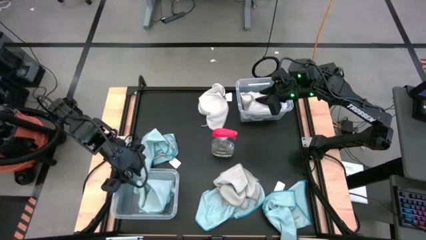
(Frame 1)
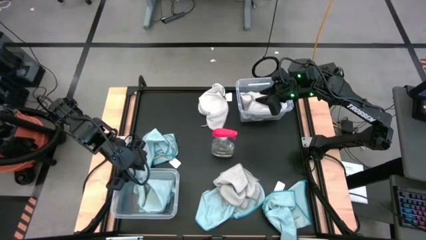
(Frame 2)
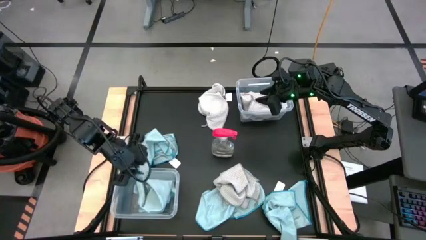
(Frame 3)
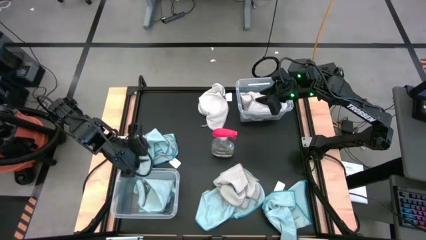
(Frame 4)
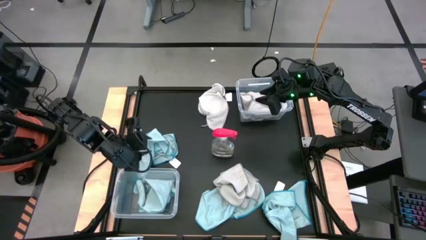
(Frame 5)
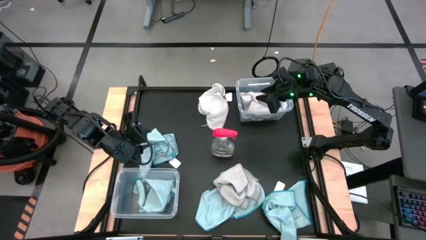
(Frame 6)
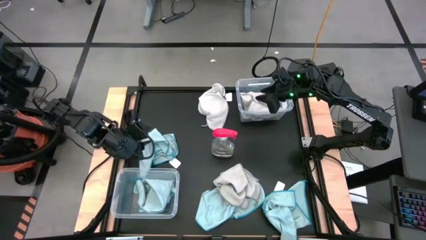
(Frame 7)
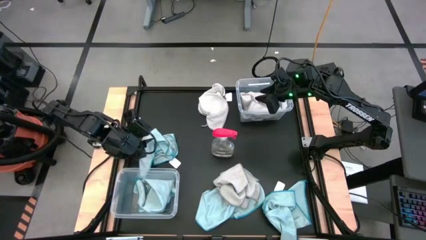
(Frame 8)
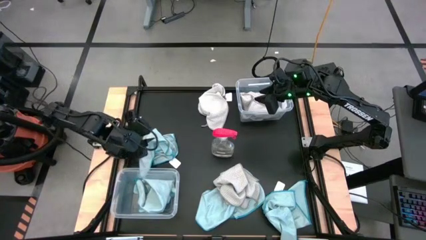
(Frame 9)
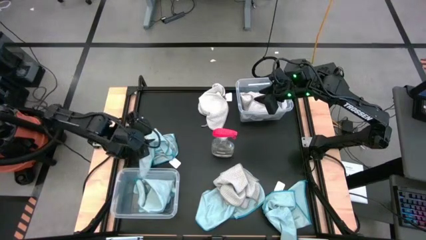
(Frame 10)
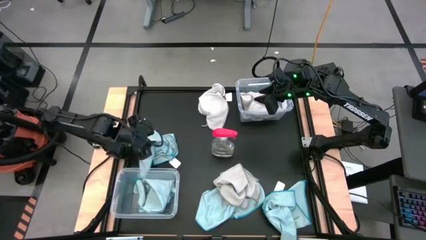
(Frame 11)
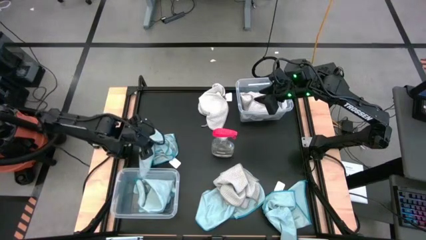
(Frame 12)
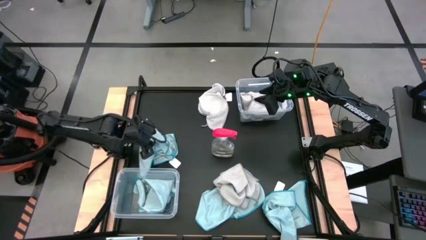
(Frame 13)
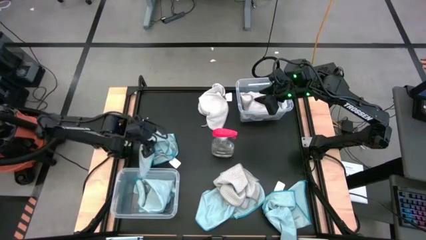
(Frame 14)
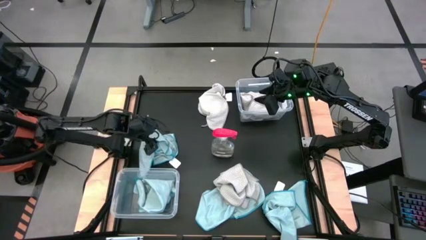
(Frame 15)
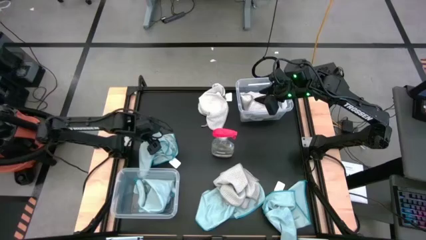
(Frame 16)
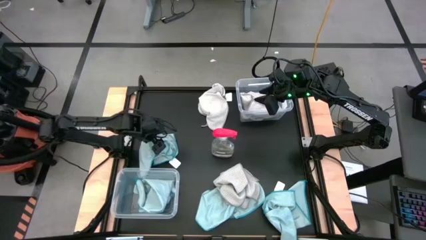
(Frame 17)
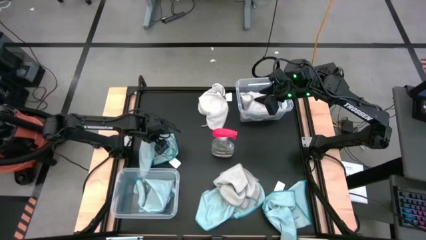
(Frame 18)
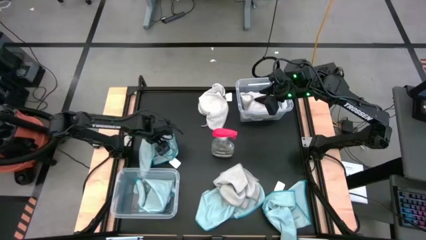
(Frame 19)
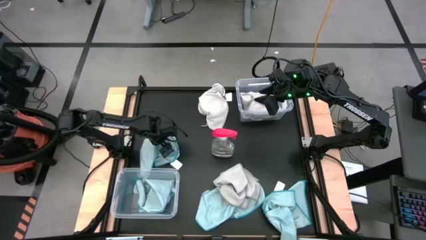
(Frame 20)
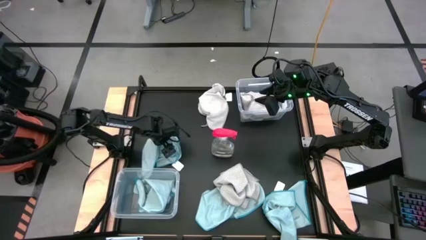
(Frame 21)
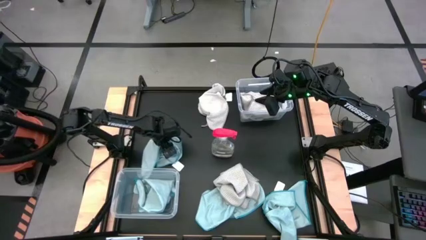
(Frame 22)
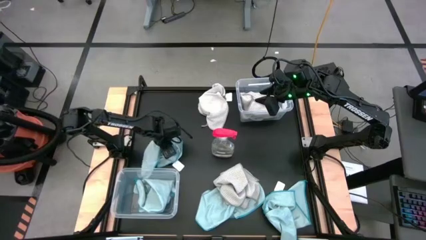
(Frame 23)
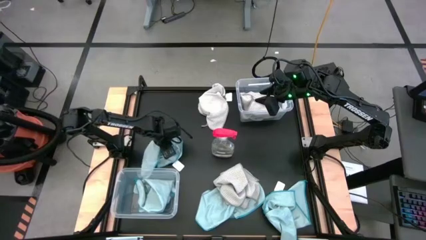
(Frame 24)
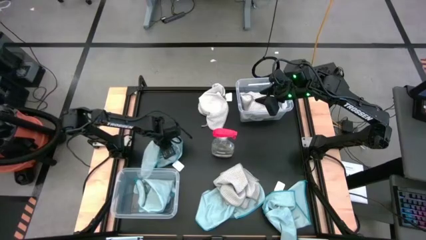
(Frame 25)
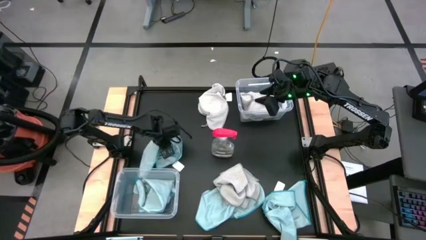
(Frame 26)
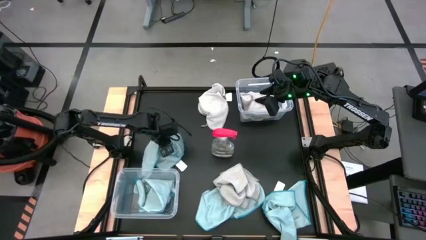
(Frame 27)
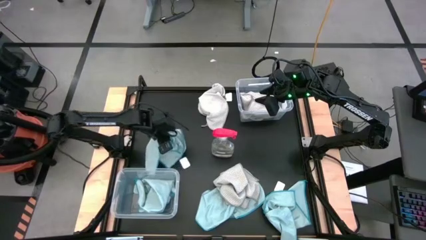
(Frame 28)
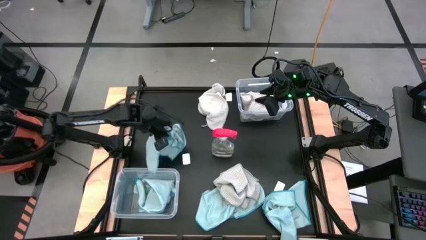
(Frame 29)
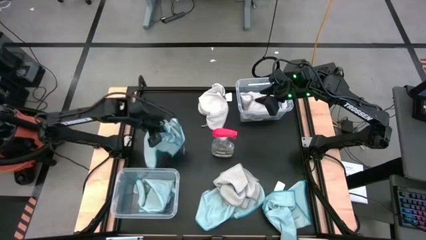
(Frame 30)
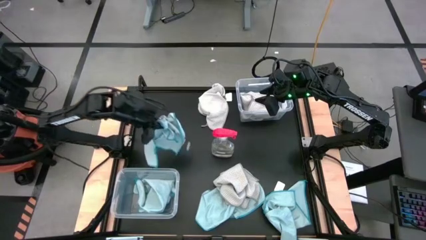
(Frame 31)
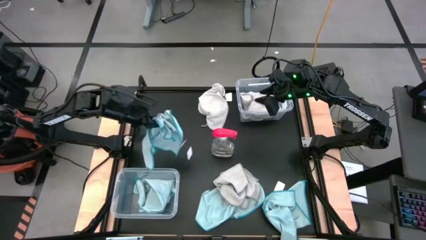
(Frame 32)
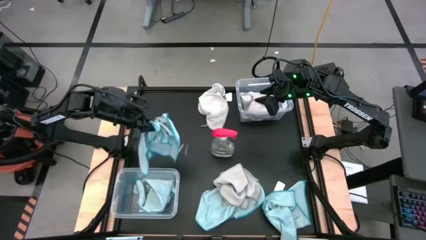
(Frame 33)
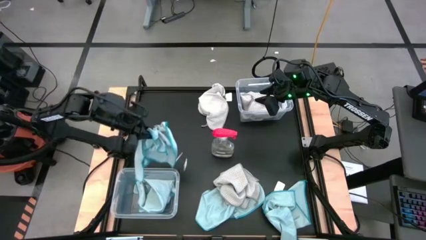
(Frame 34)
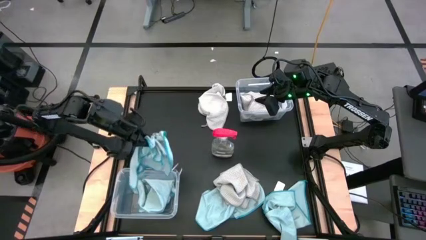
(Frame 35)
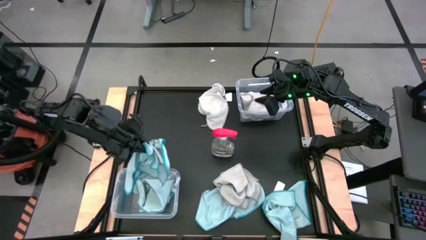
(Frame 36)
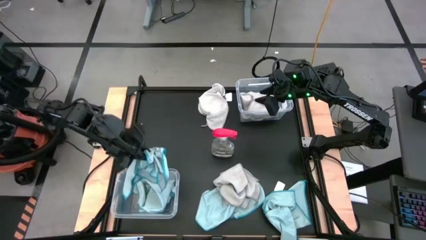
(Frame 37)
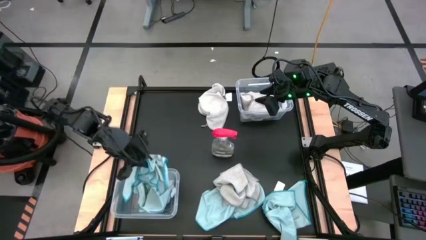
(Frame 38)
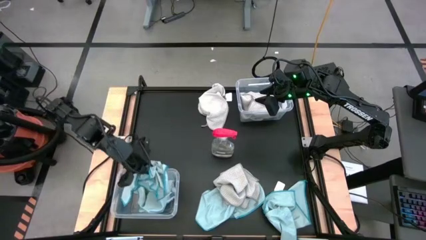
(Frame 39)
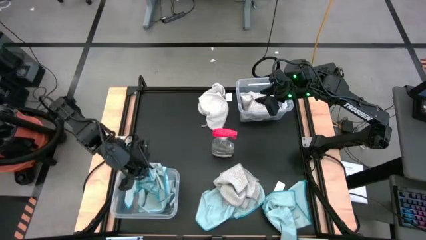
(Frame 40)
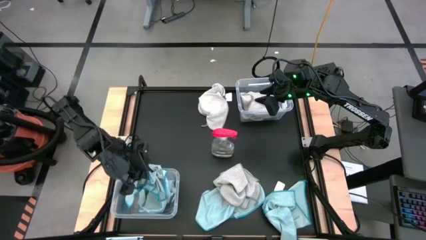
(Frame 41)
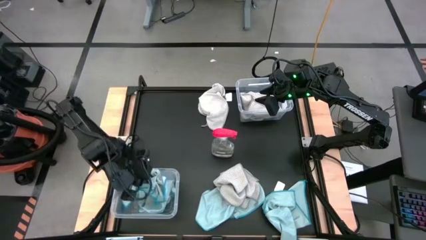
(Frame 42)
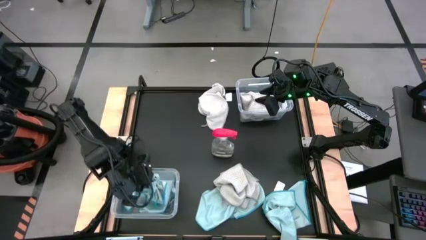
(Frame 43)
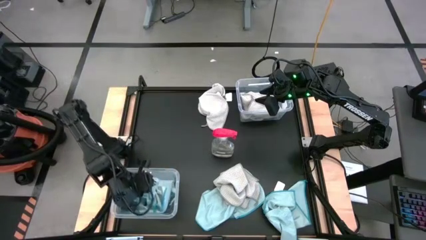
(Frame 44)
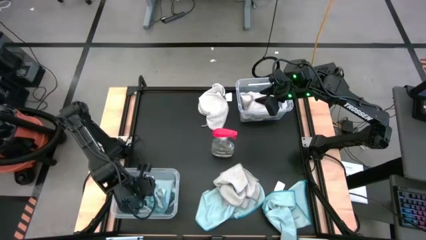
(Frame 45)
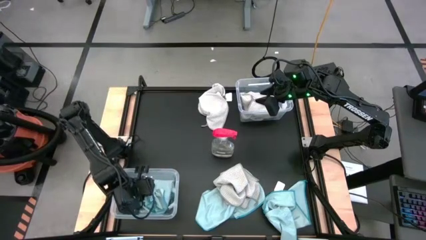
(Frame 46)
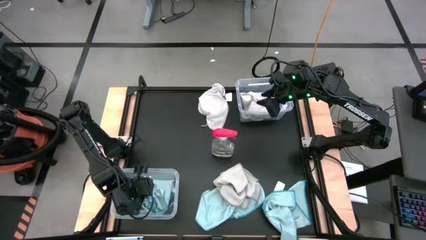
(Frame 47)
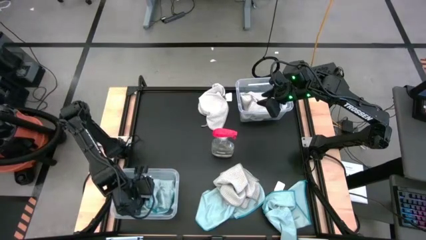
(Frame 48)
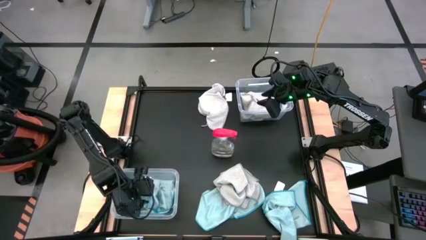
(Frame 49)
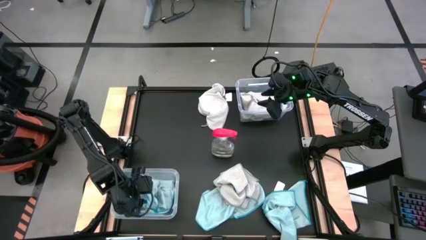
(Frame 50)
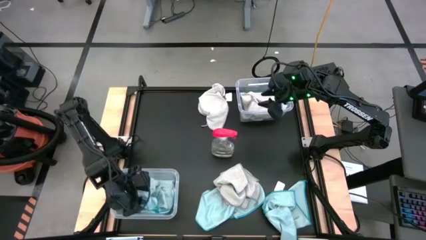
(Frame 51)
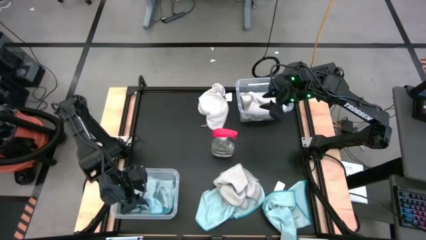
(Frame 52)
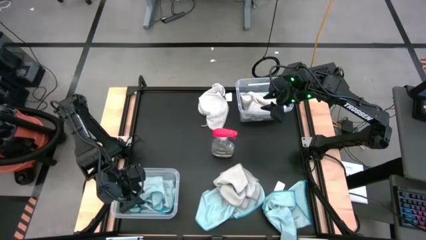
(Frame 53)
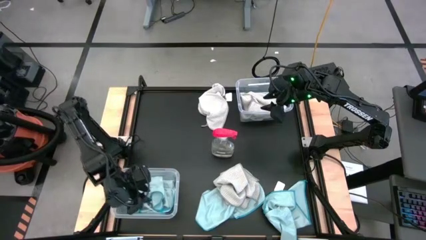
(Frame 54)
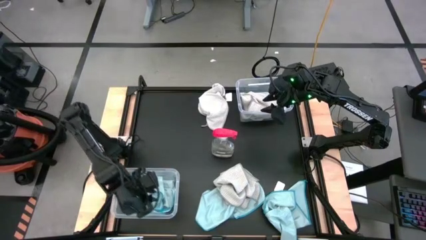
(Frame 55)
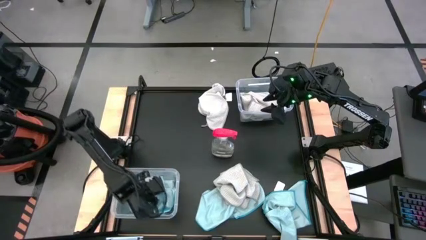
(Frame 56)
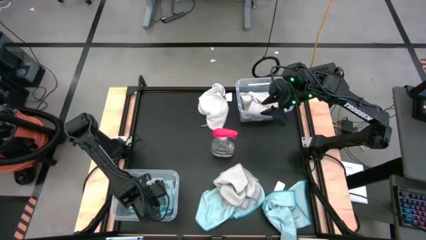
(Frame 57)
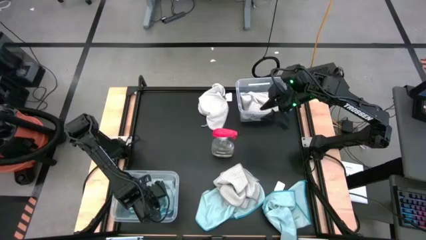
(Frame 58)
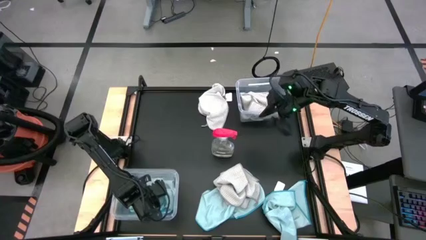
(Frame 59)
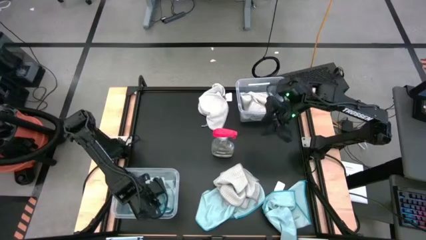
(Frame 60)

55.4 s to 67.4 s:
Task: Sort microfiber towel by color & place in baskets
Put the blue towel into the bottom transparent bin

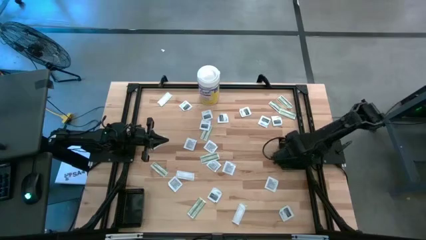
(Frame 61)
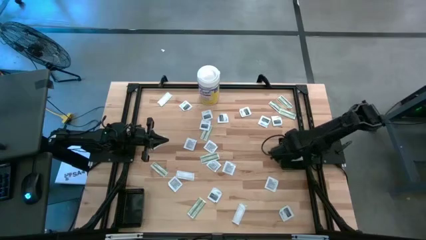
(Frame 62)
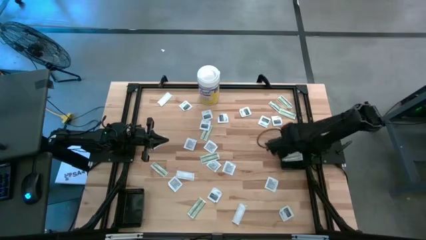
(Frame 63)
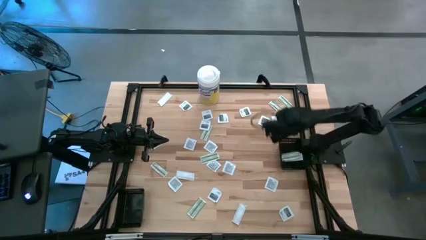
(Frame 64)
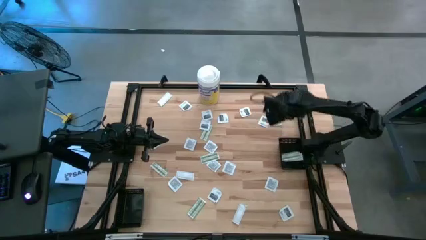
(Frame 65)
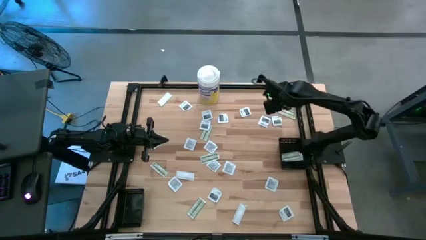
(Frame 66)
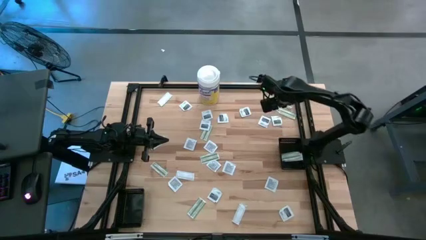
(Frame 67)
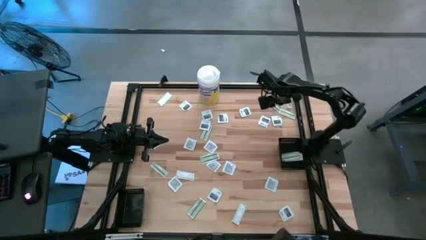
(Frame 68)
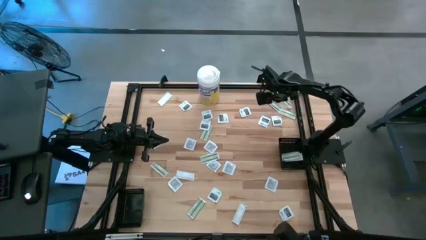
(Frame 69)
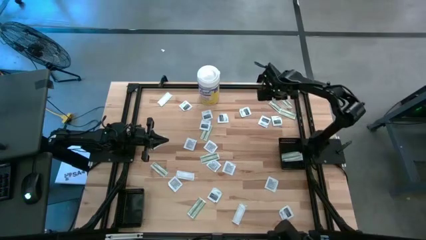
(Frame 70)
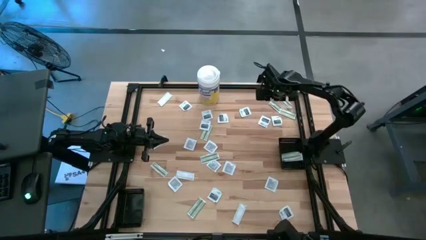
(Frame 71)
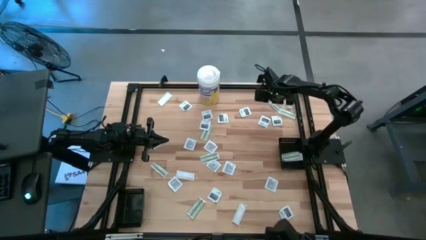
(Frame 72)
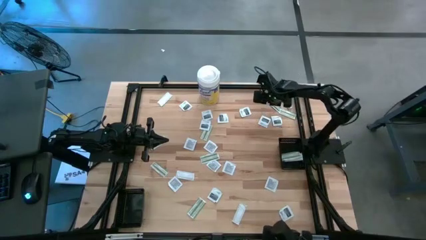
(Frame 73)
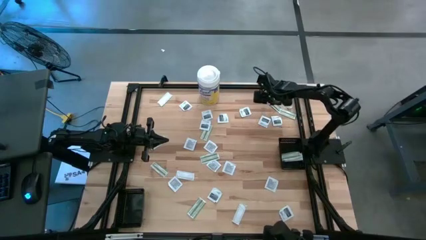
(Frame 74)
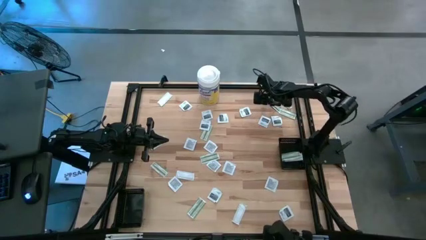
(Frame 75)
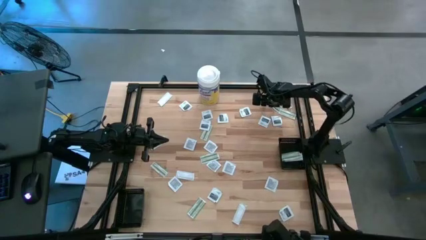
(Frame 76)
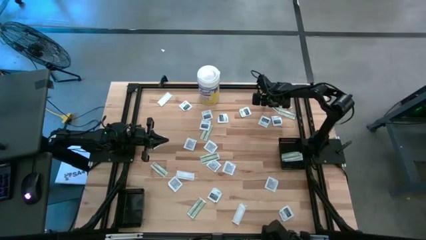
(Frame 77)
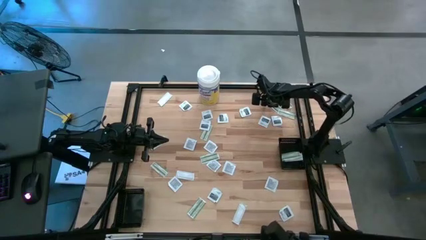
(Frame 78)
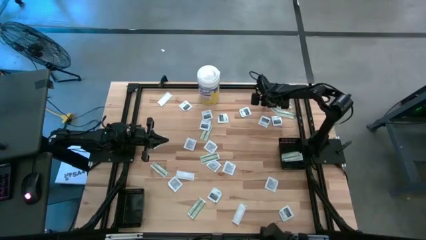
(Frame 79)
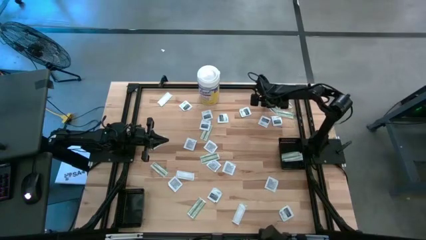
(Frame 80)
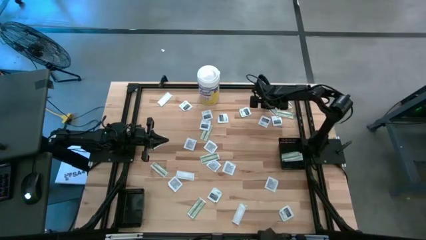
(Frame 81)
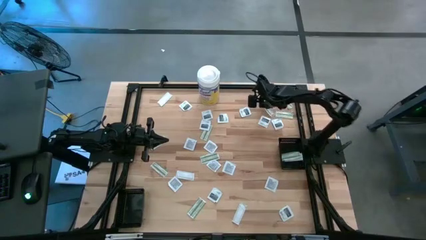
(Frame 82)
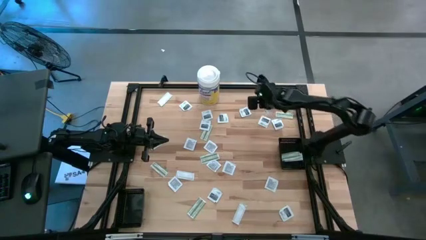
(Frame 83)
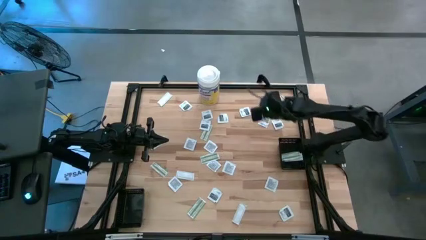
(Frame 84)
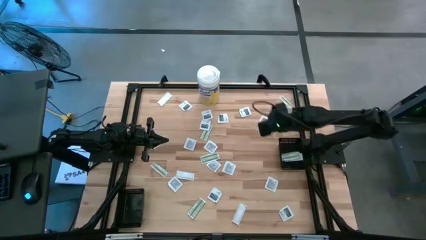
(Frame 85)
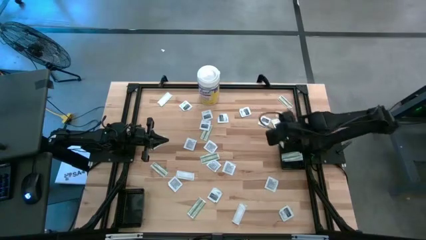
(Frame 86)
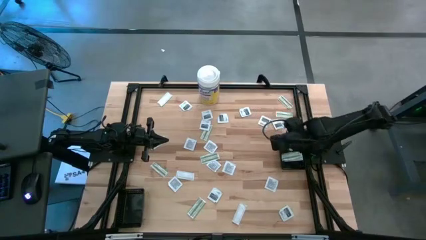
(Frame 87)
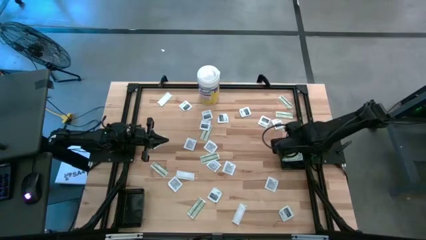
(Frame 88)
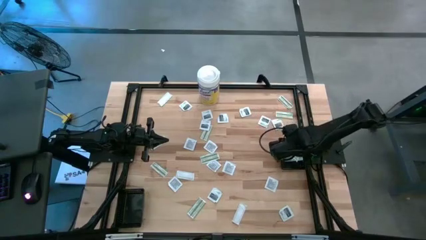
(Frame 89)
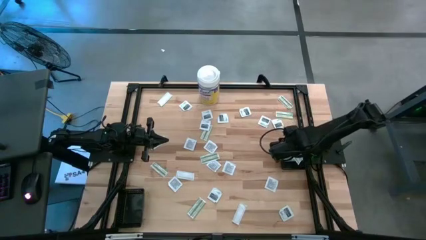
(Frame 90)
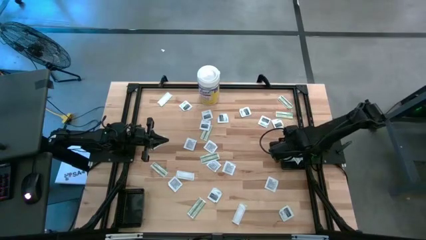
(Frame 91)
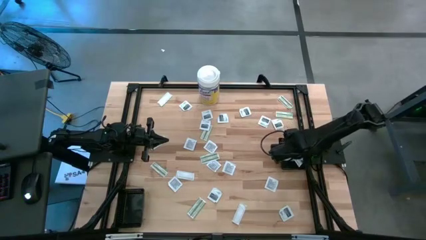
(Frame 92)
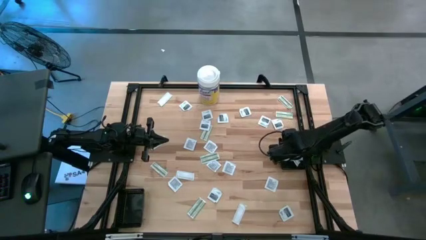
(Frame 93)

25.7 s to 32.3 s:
Task: Pick & Place First Aid Supplies
Put the white bandage pad into the right black bin
